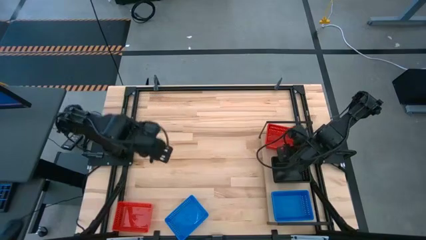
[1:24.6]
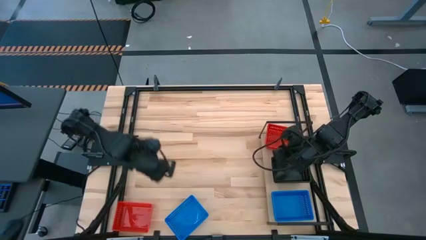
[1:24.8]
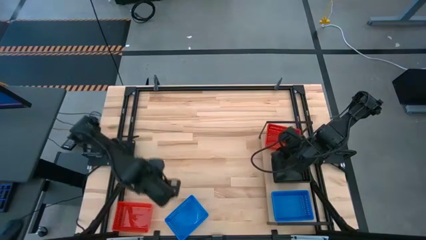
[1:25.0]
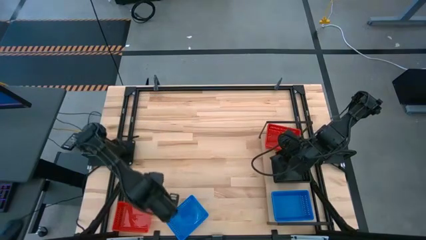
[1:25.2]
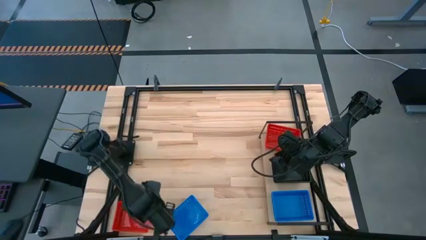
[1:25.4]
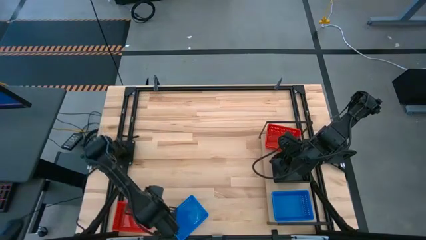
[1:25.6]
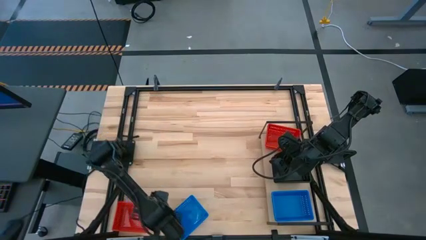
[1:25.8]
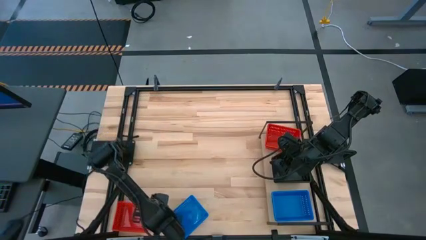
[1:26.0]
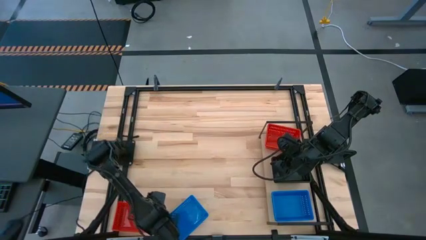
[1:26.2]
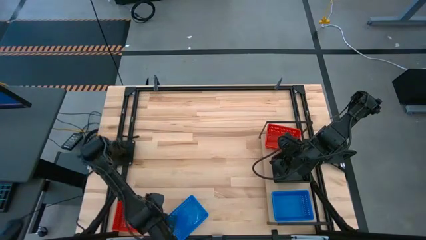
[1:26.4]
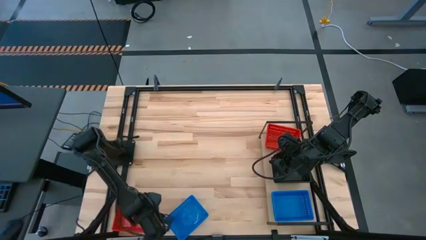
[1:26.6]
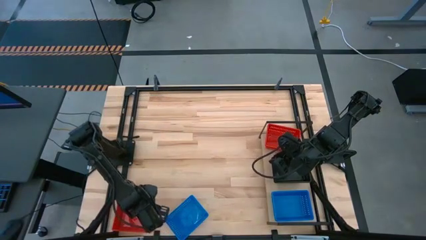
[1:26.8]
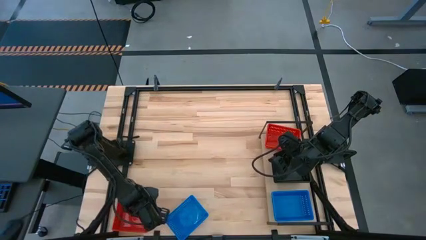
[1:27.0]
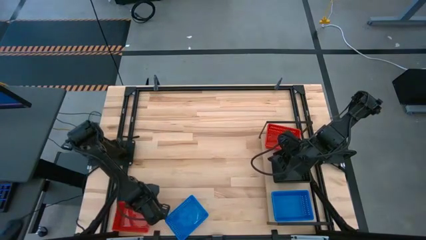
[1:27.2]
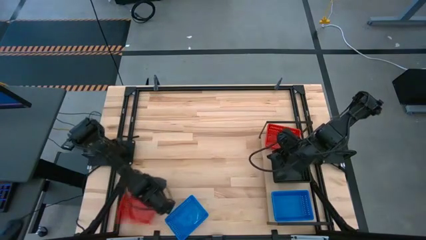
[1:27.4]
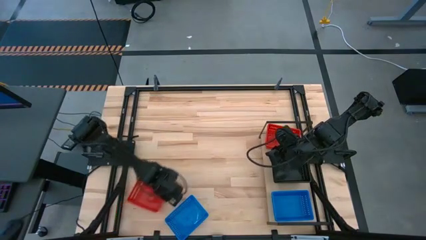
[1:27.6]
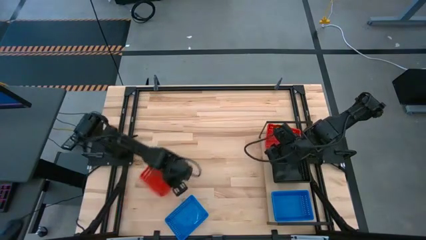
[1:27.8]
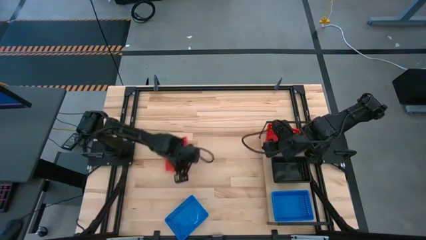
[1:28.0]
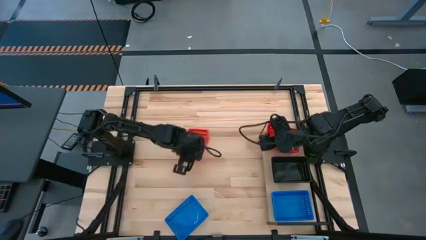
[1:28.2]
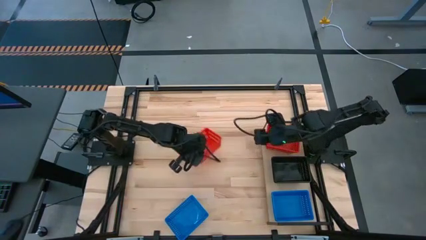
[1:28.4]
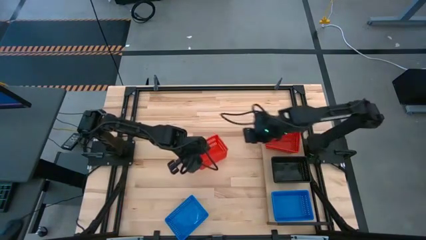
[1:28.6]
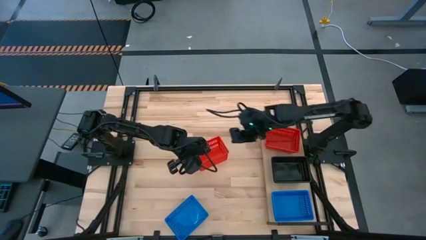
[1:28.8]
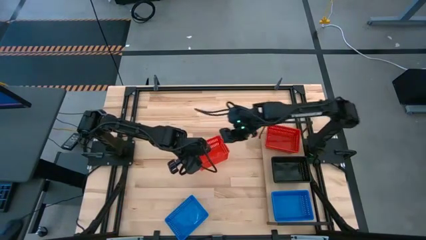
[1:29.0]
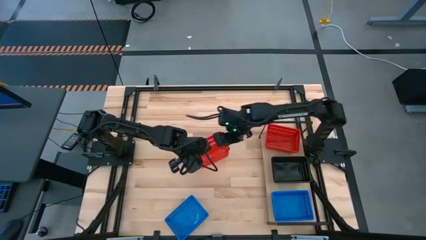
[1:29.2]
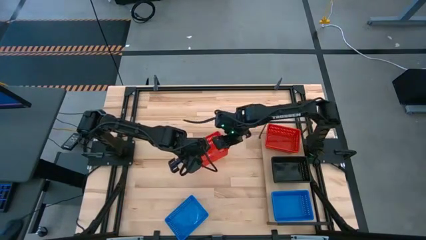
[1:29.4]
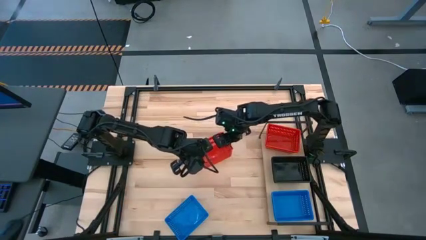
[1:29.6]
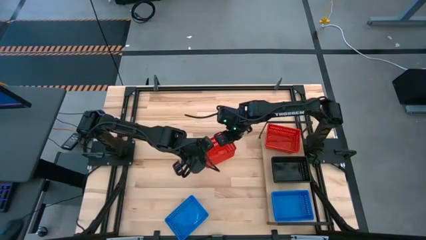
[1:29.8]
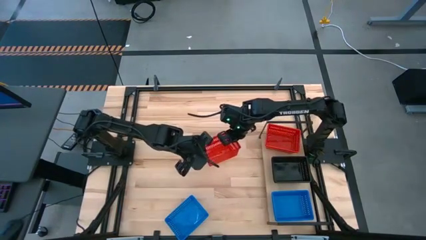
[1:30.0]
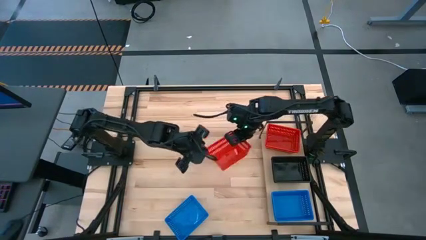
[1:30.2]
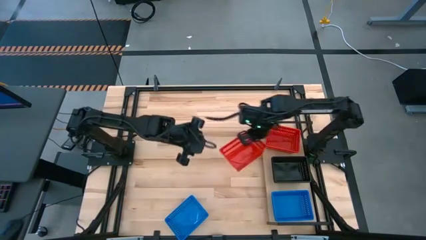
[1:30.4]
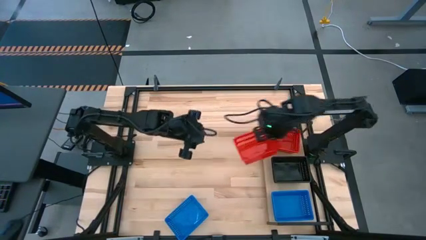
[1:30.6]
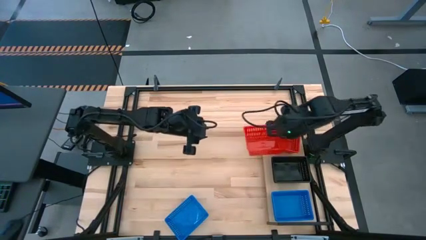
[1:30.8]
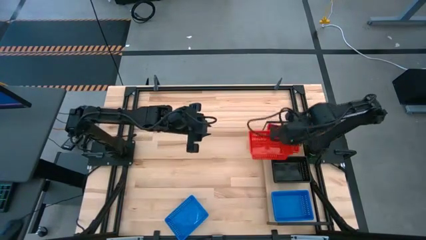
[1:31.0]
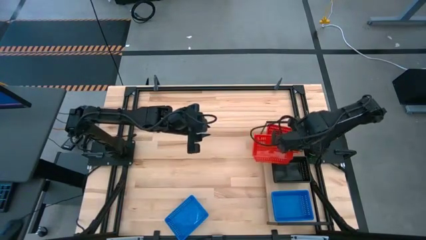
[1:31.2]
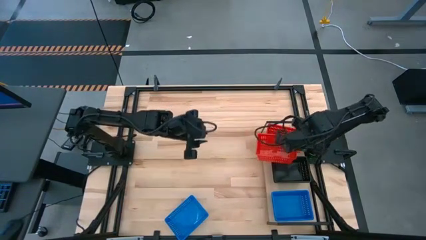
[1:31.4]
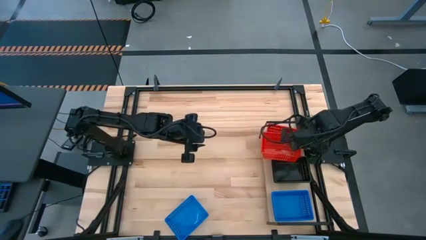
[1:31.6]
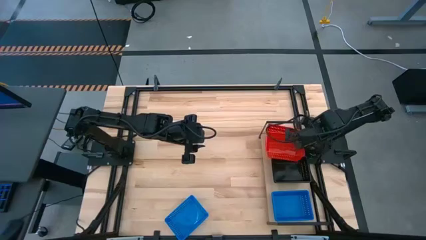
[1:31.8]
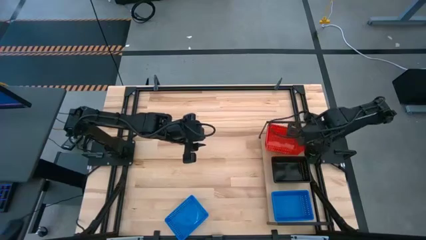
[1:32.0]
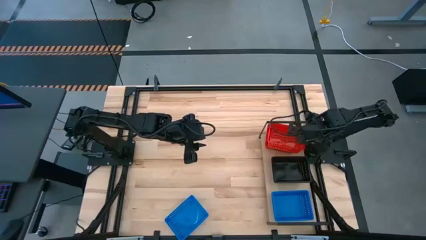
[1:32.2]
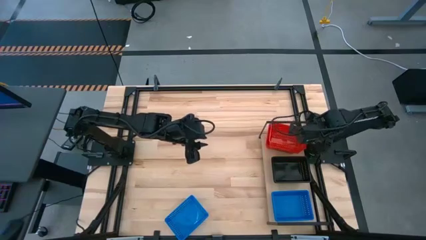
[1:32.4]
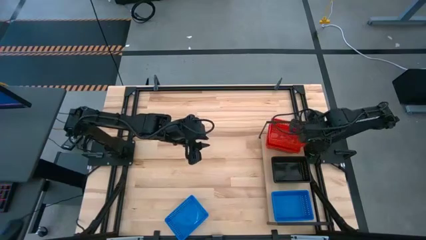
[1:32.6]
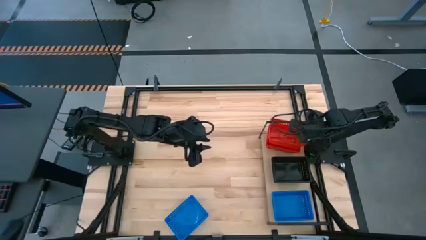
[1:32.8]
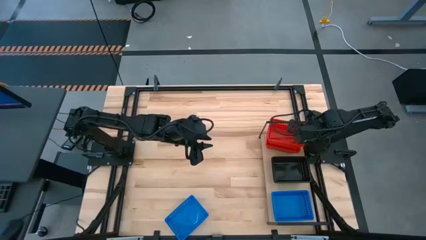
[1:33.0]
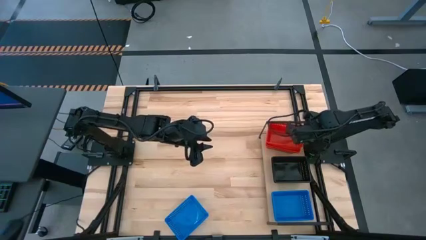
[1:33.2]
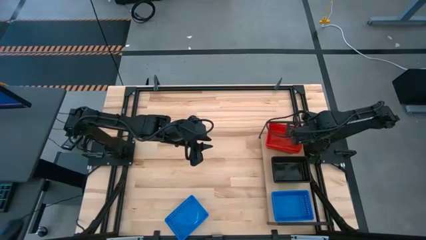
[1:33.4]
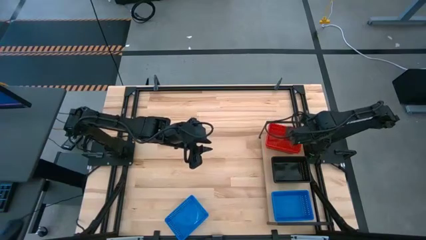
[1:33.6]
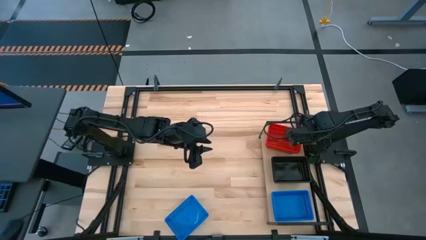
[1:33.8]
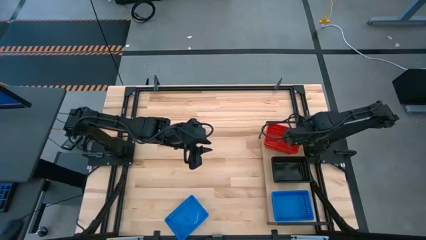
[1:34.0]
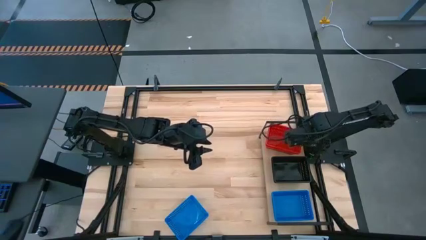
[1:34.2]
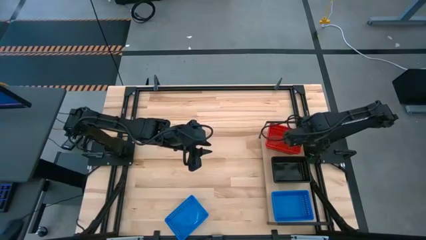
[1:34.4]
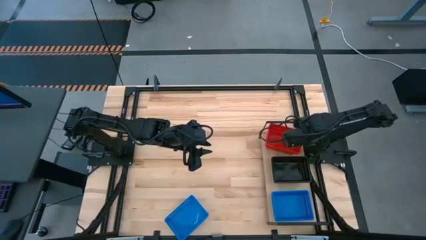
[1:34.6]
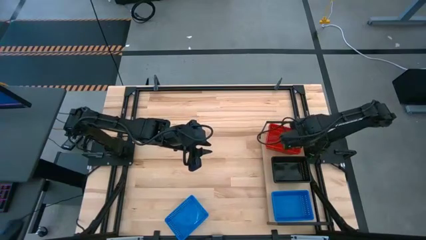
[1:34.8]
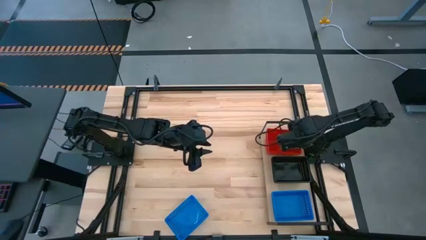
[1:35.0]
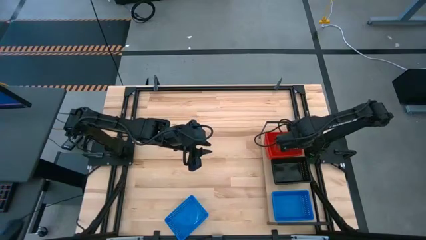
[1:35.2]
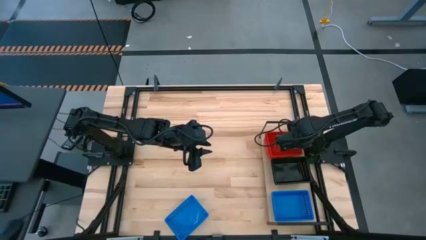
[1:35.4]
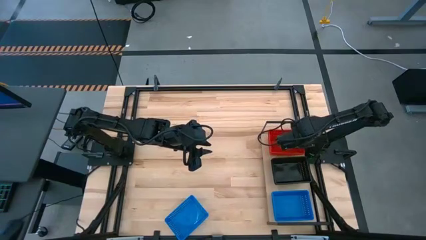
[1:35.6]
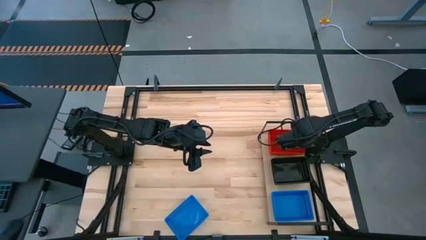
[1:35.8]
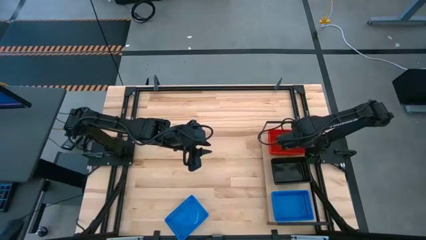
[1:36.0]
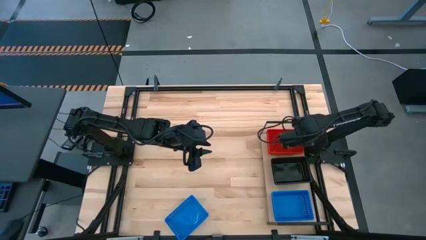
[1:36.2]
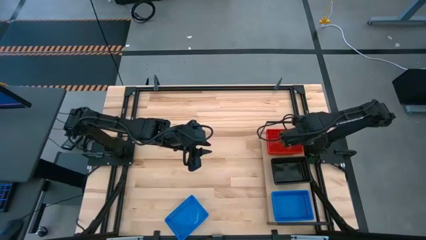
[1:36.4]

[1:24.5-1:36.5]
Task: Stack baskets on shelf by color
Stack the red bin on top of the red bin on the shelf

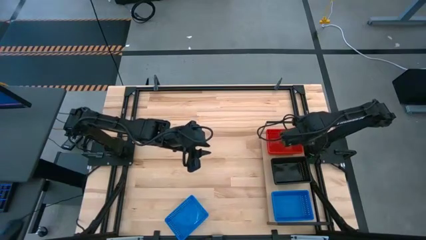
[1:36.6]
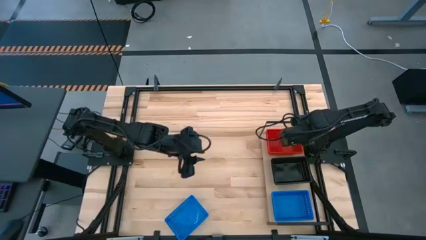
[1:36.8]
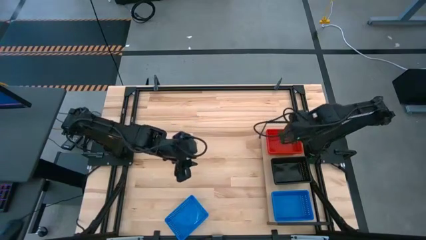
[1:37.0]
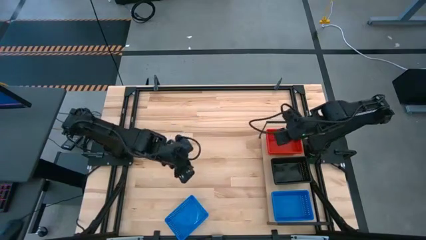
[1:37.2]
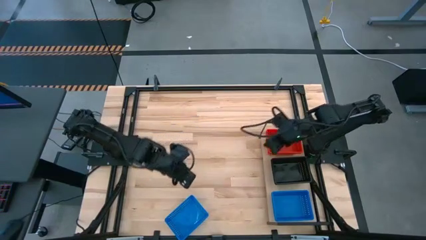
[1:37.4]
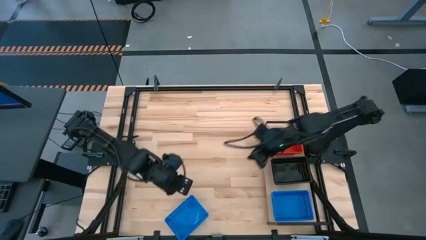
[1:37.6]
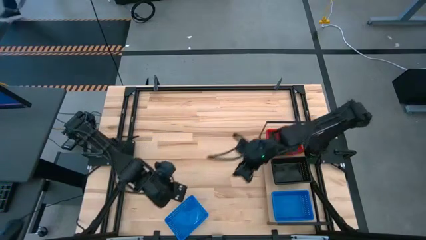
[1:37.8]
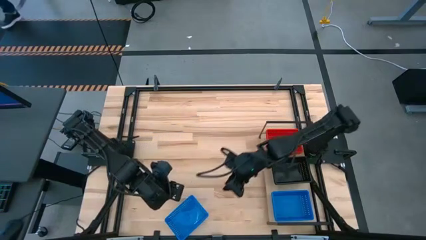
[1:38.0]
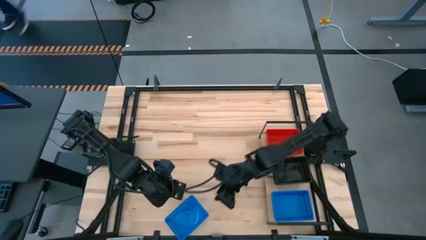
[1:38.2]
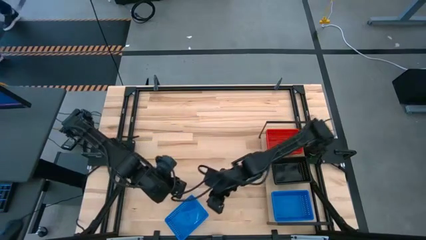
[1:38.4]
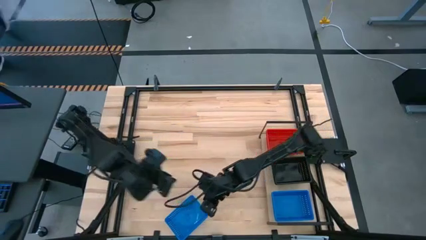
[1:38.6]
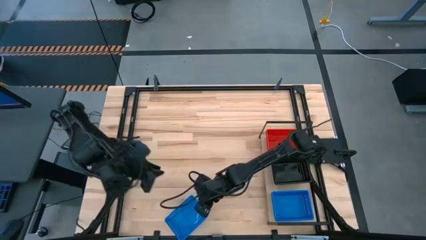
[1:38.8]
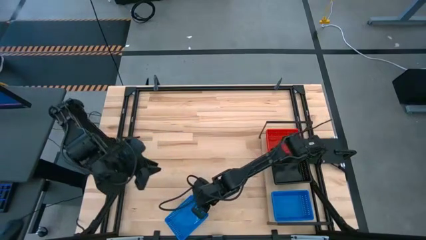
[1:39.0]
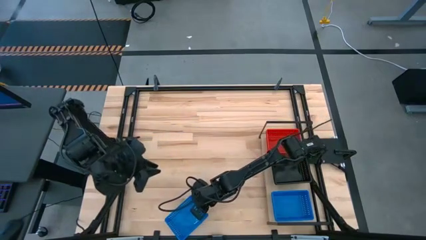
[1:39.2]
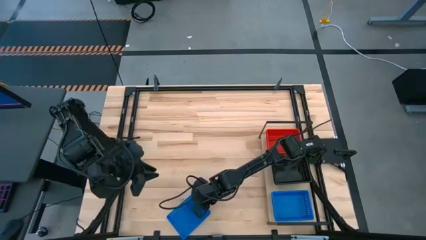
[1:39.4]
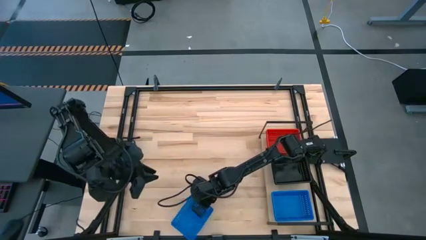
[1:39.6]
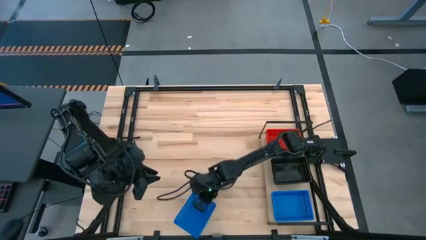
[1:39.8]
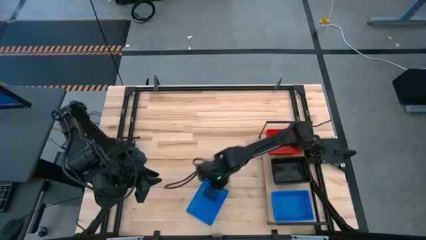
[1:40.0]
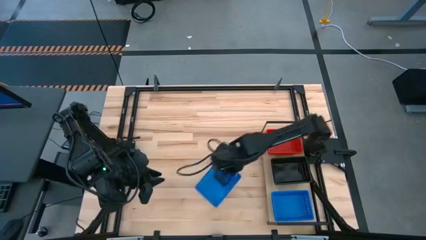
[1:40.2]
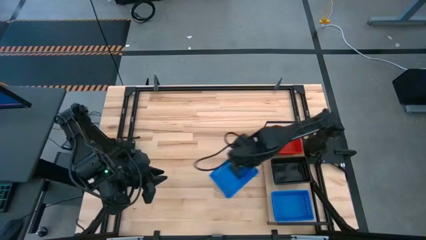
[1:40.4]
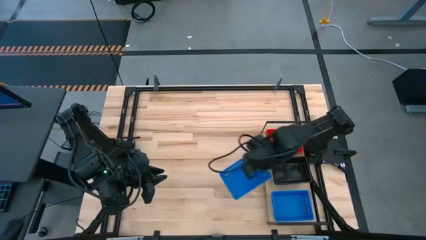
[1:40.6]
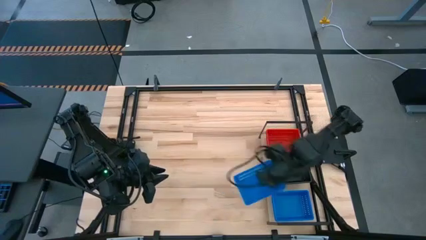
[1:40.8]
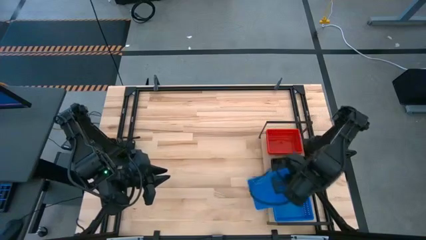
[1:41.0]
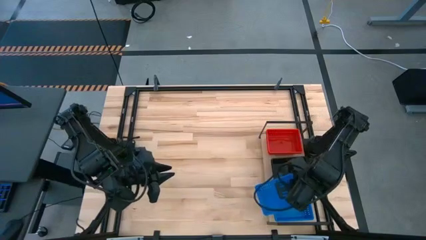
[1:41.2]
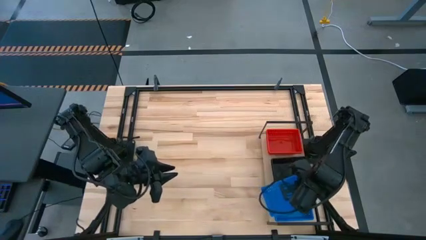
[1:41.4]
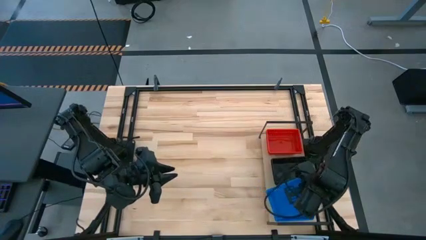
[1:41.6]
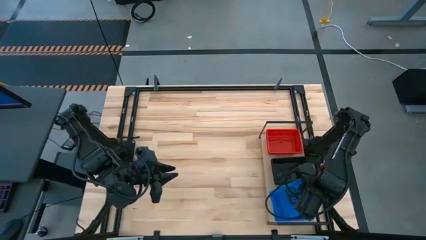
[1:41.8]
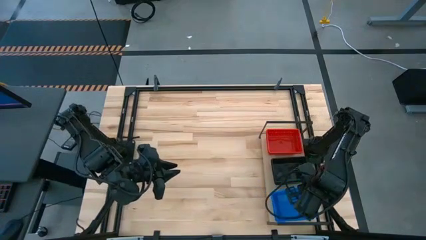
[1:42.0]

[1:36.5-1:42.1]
Stack the blue bin on top of the blue bin on the shelf

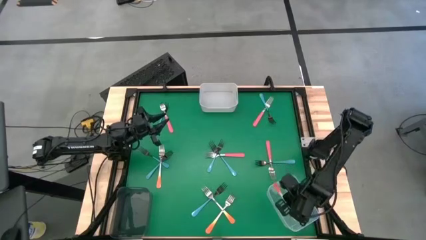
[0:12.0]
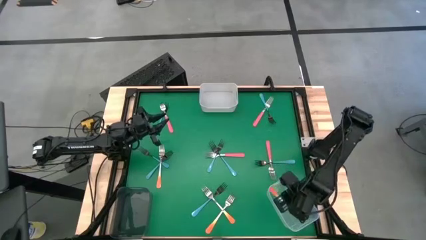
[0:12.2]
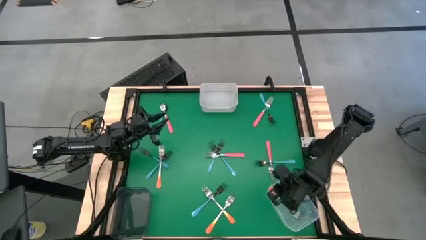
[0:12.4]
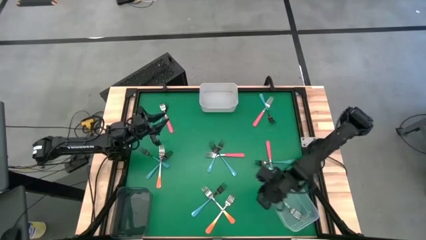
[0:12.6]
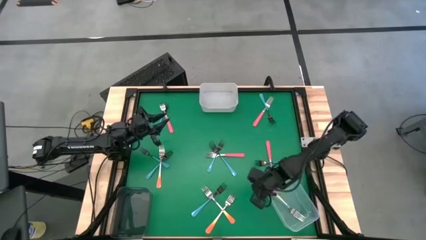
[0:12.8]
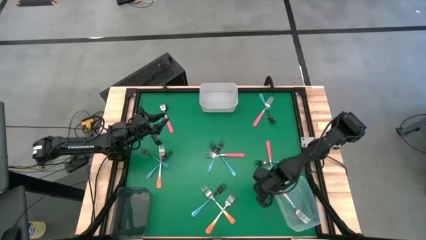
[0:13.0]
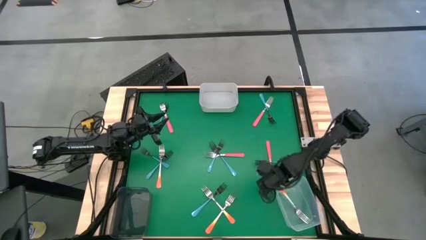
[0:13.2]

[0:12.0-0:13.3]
Task: Sort silverware by color (type)
Adjust the transparent bin
